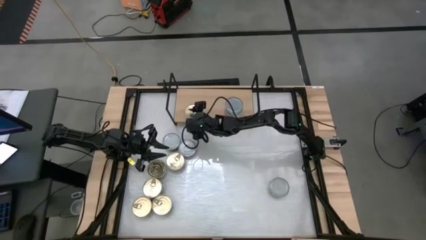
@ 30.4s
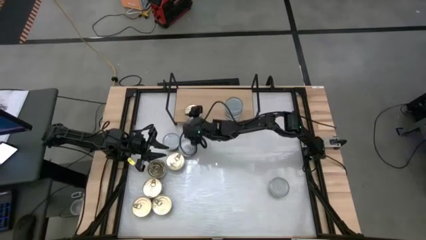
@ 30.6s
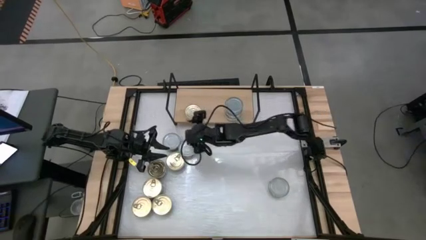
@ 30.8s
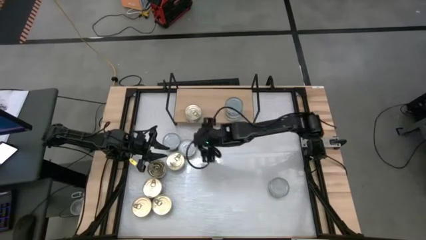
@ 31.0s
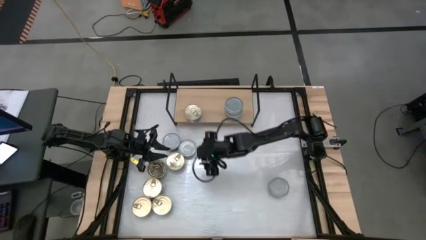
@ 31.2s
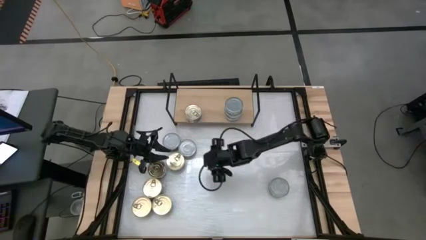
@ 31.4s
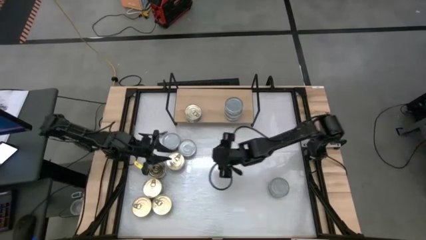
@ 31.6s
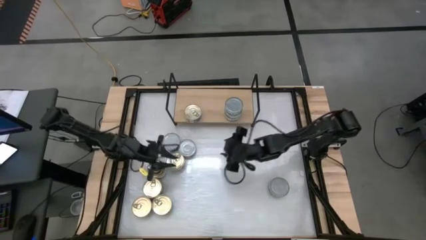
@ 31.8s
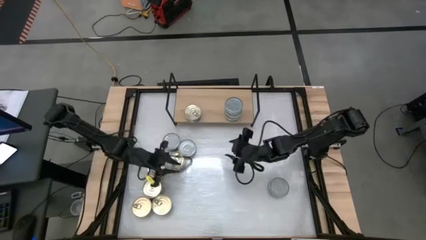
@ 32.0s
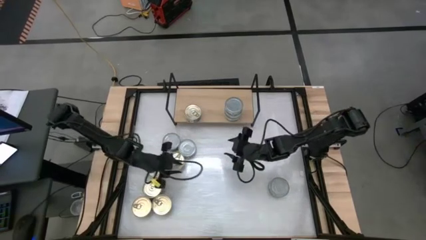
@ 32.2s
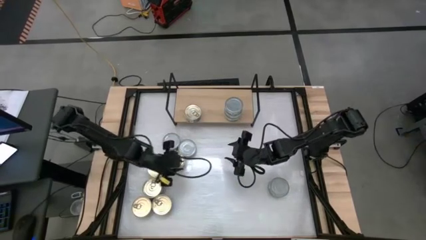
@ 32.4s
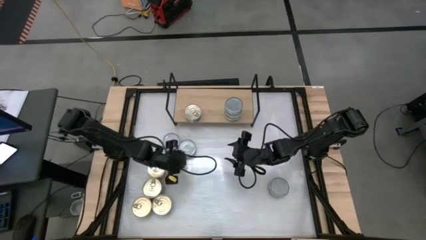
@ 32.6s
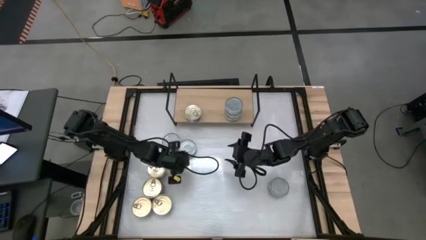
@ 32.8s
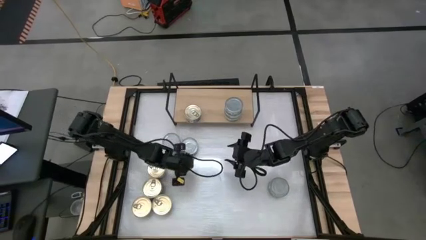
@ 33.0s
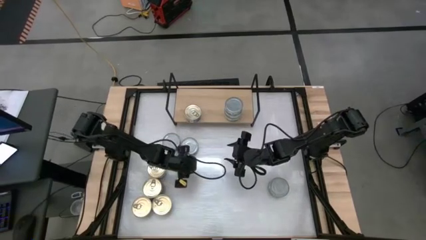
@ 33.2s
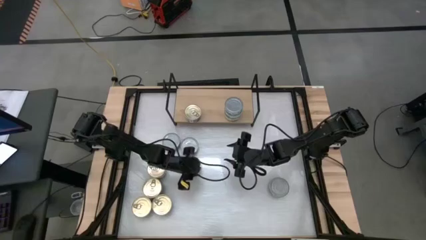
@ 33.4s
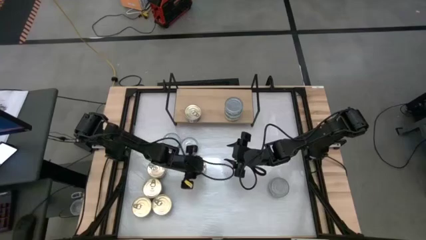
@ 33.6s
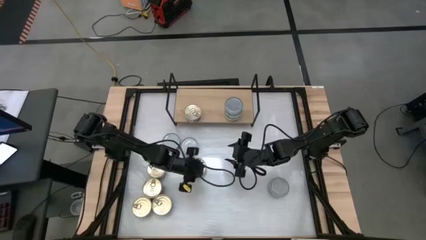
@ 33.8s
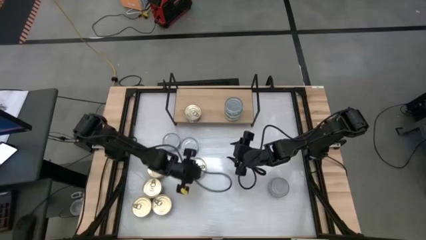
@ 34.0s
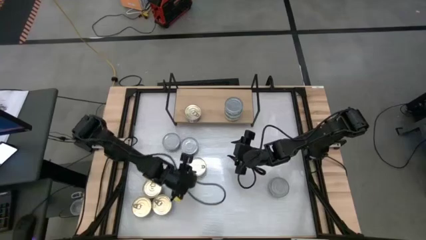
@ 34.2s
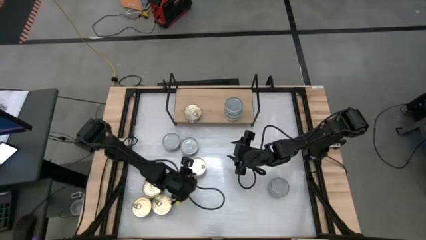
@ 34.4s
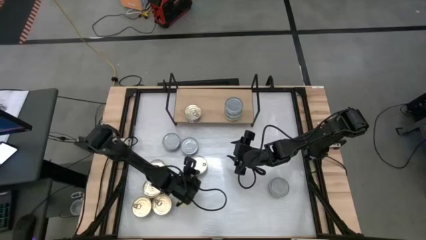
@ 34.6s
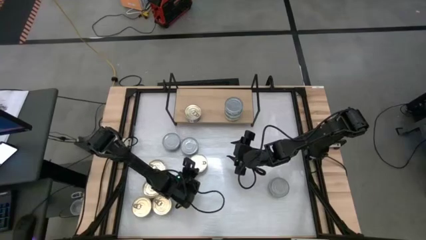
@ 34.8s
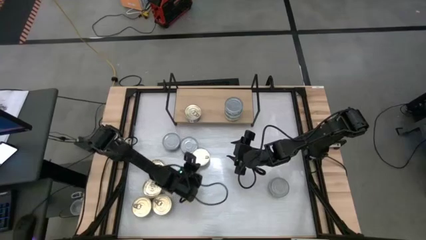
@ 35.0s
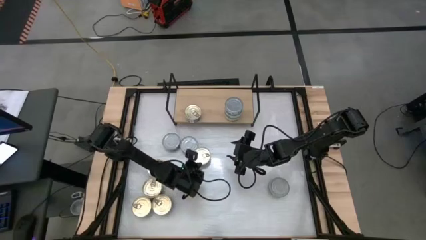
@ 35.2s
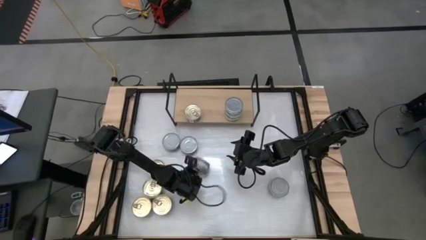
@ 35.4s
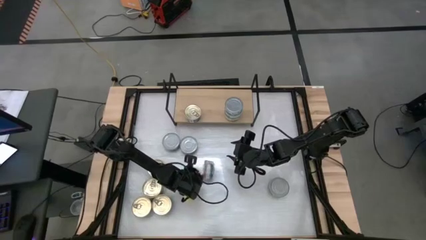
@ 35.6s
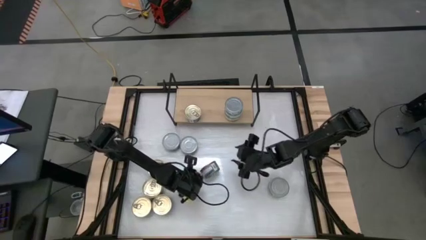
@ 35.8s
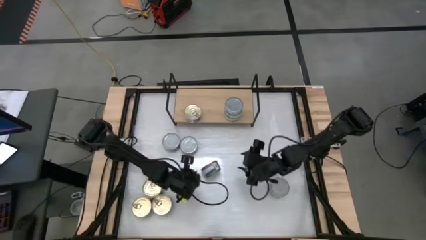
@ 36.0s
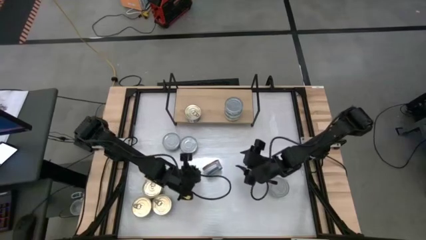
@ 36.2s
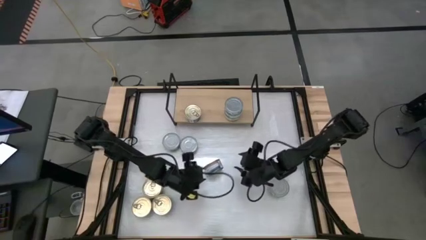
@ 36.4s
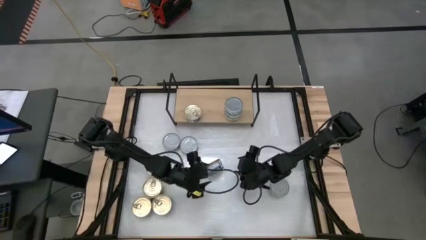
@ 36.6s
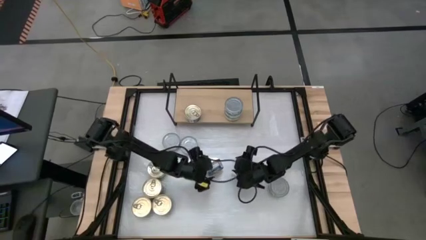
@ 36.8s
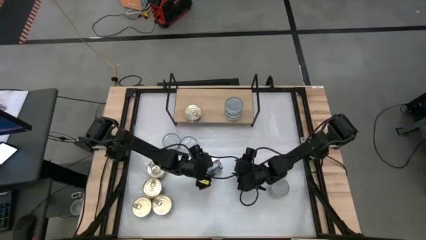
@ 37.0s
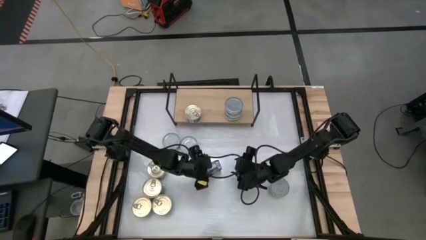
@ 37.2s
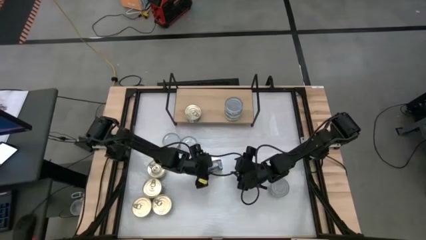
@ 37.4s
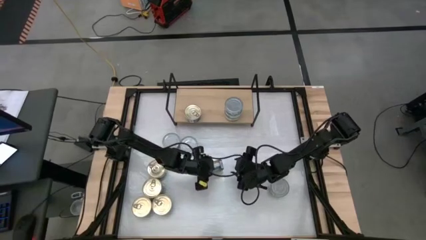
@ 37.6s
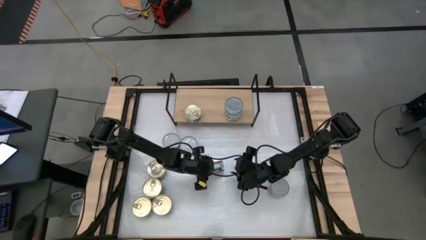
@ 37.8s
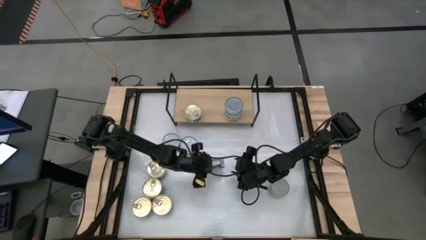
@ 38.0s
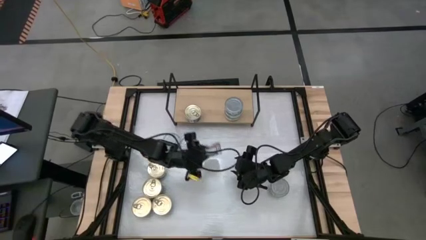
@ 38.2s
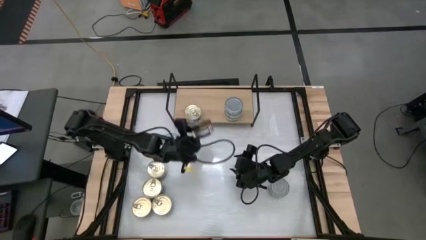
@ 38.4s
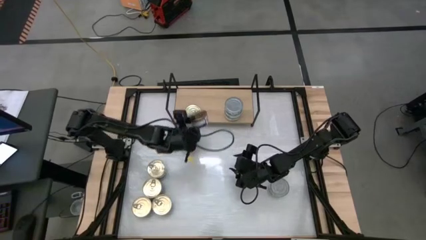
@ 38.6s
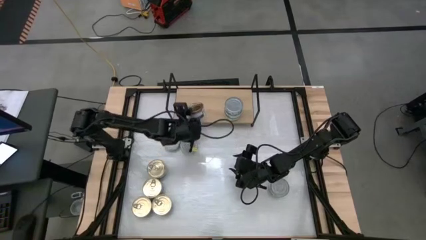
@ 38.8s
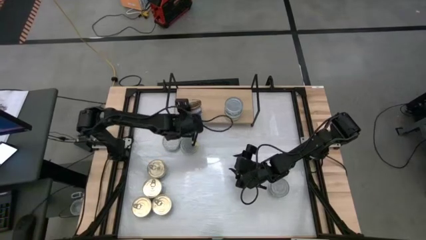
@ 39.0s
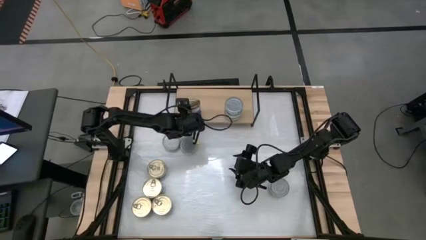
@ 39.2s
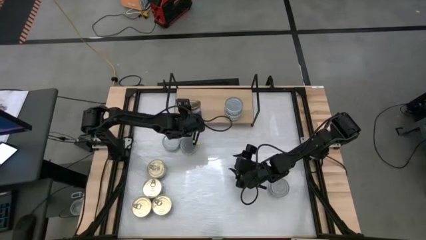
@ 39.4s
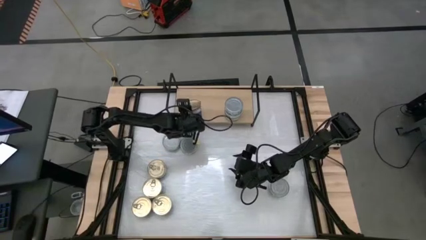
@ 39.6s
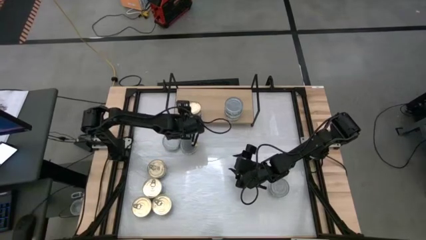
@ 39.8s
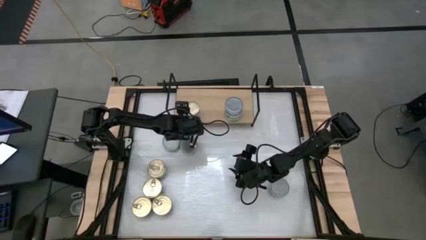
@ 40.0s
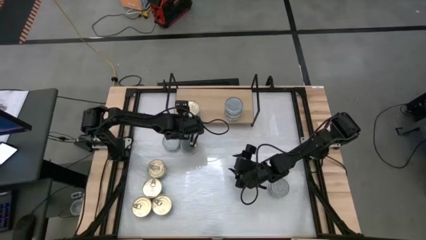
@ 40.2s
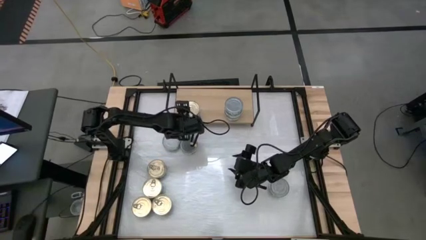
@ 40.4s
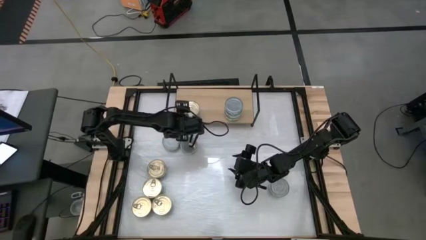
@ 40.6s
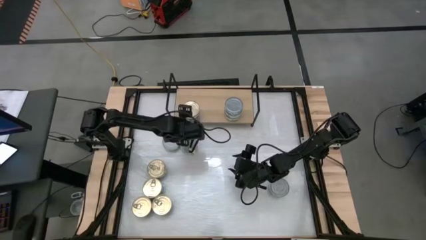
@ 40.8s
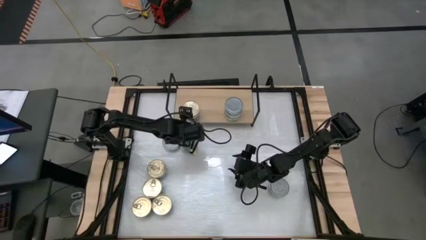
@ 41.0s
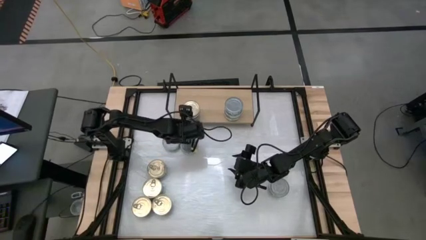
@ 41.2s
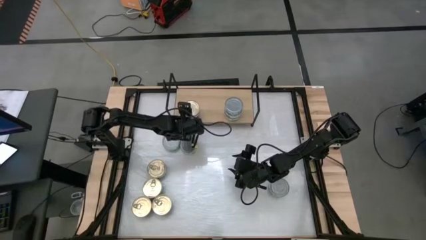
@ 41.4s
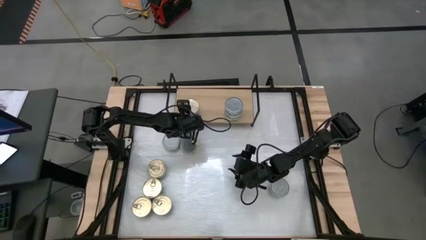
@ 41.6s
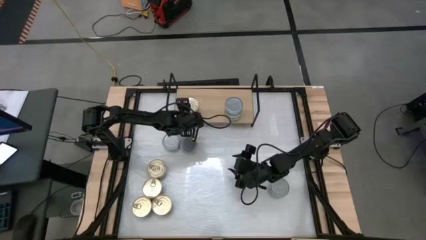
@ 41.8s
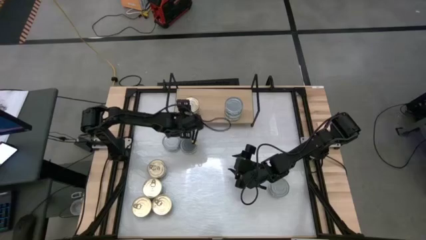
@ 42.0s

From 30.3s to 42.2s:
Task: Stack canned seafood by type on shelf
Stack the blue pink tuna can on top of the blue pink tuna can on the shelf

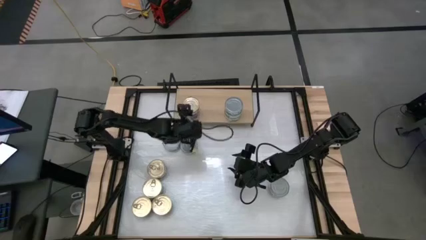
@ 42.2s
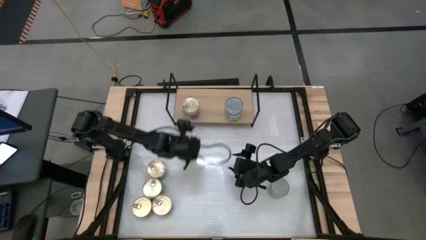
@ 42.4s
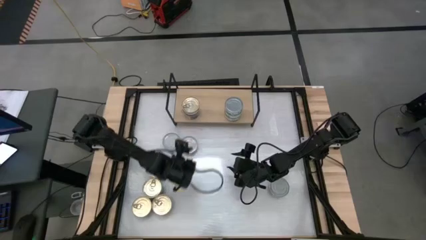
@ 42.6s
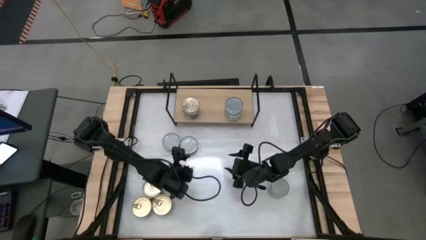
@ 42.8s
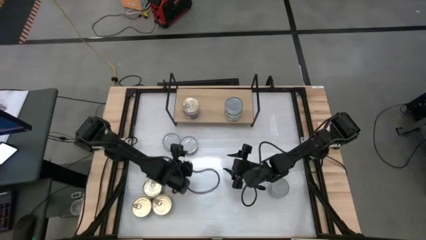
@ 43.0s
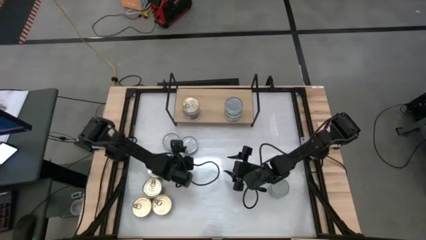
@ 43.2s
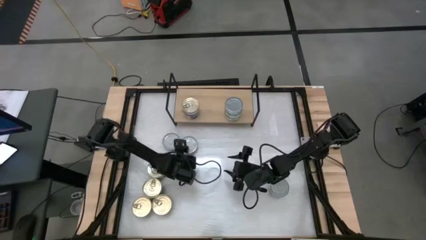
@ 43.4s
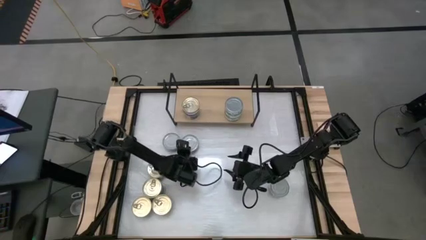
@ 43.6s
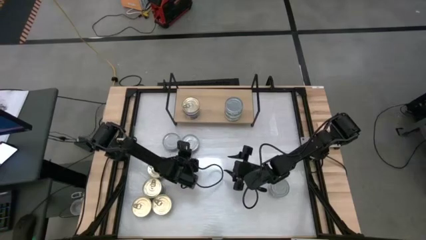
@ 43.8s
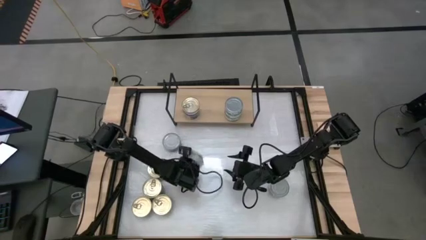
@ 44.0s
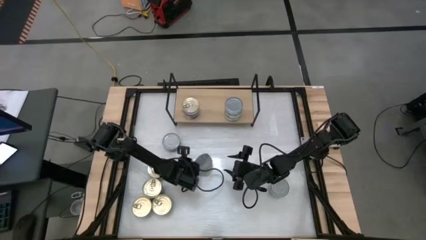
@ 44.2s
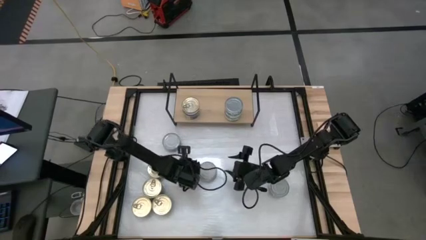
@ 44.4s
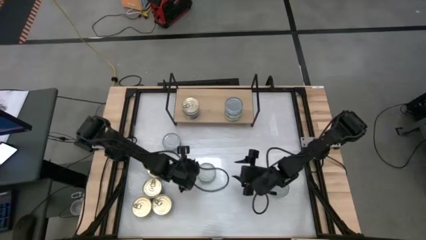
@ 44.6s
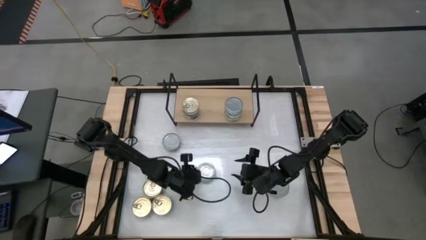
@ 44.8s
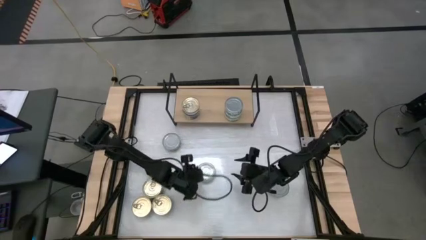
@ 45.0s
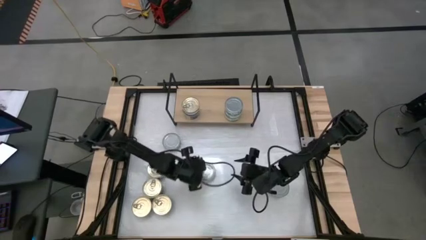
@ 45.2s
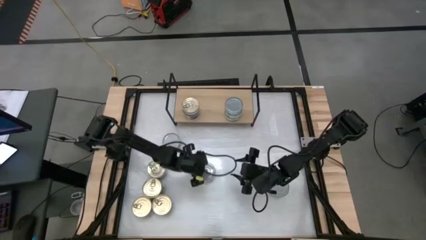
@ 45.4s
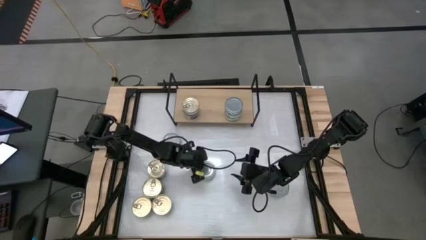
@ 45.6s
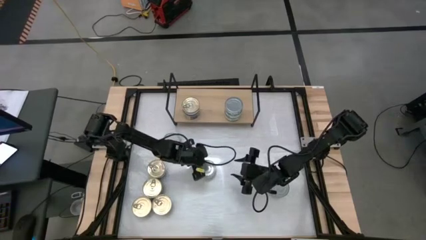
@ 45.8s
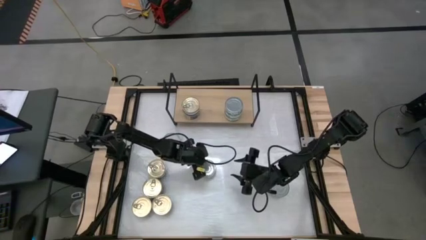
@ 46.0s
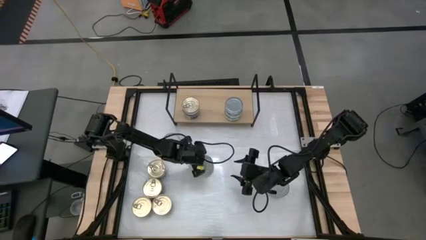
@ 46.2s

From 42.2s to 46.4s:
Stack the green tuna can on top of the green tuna can on the shelf
